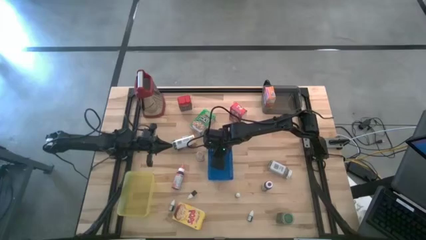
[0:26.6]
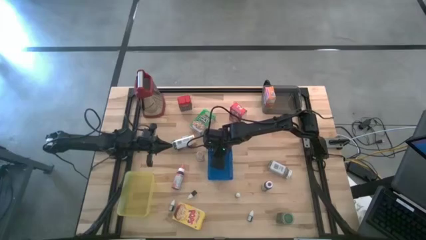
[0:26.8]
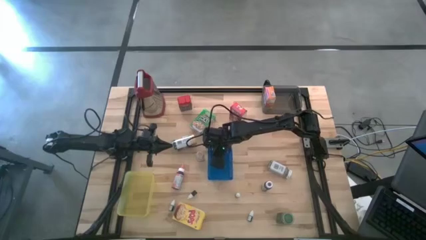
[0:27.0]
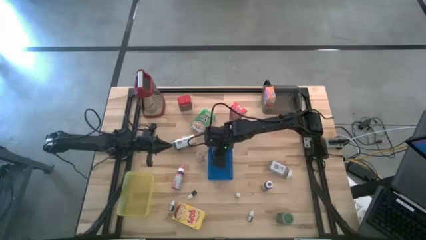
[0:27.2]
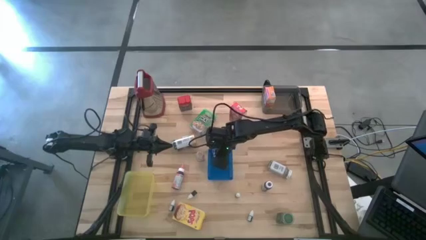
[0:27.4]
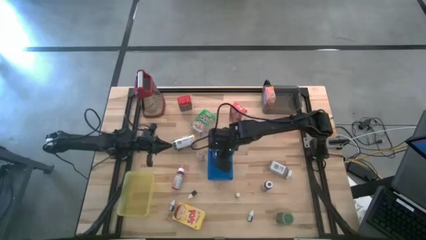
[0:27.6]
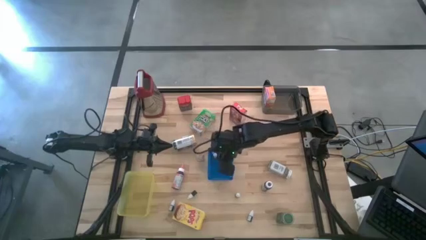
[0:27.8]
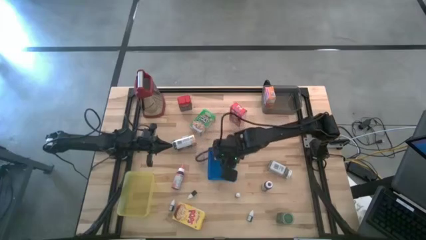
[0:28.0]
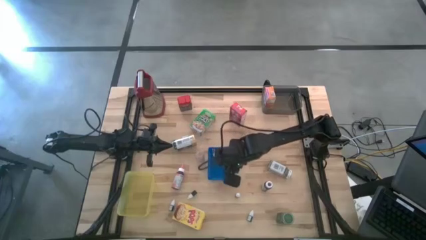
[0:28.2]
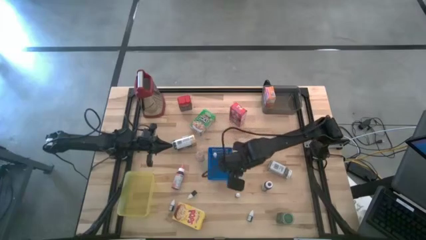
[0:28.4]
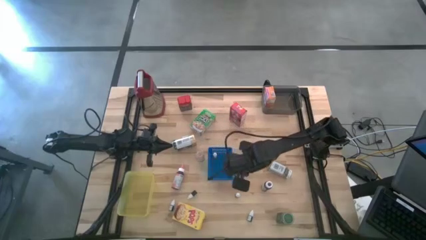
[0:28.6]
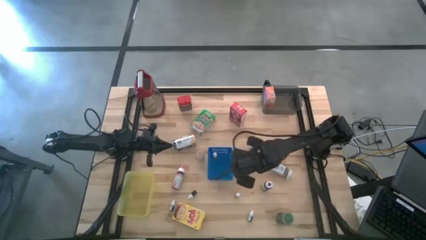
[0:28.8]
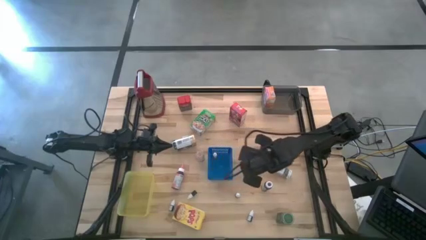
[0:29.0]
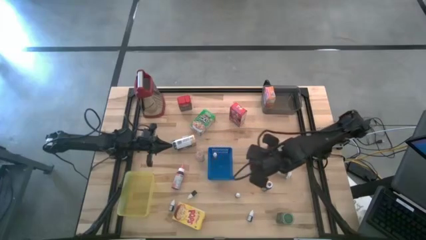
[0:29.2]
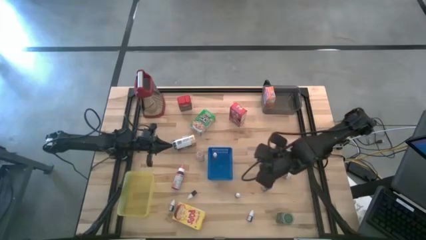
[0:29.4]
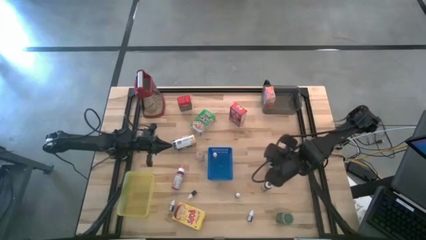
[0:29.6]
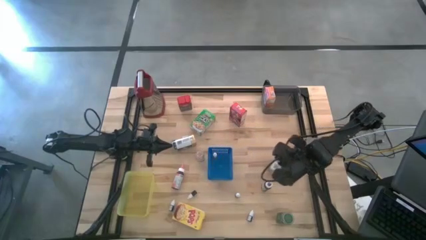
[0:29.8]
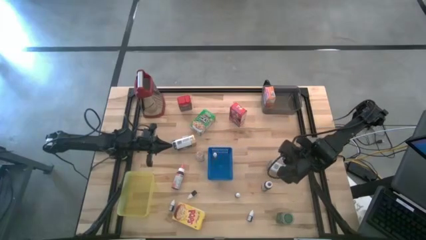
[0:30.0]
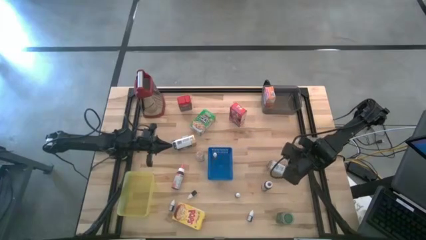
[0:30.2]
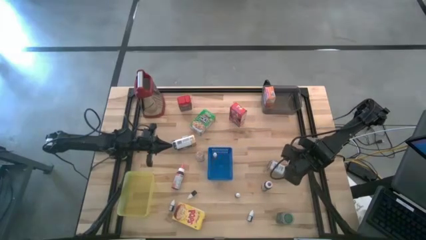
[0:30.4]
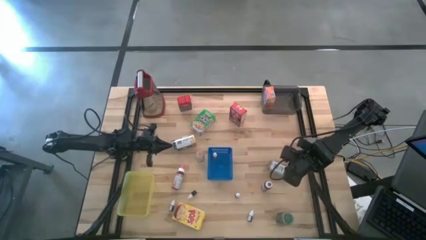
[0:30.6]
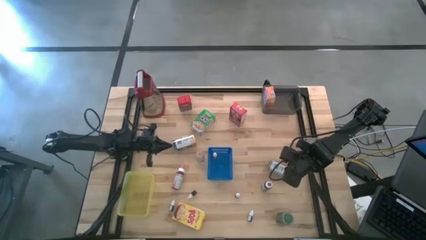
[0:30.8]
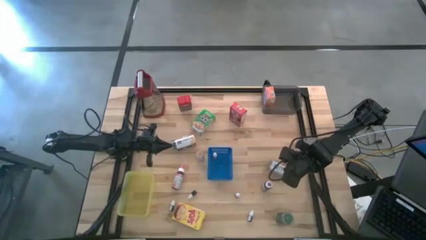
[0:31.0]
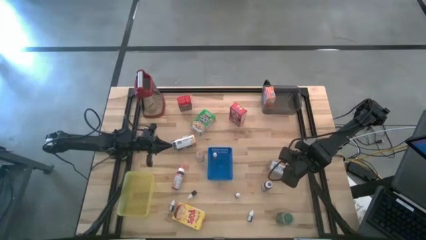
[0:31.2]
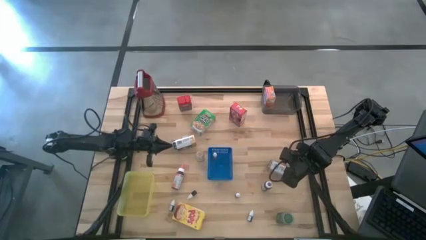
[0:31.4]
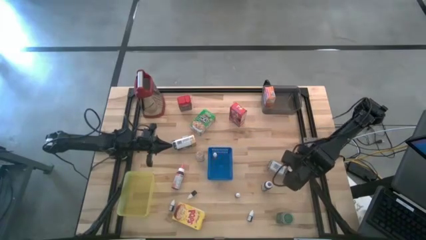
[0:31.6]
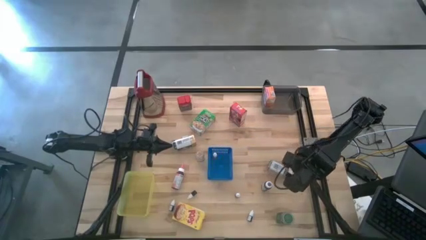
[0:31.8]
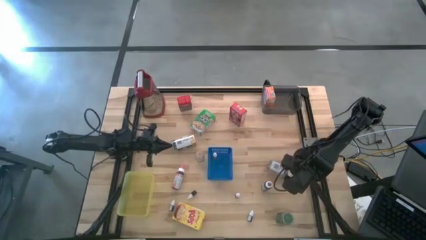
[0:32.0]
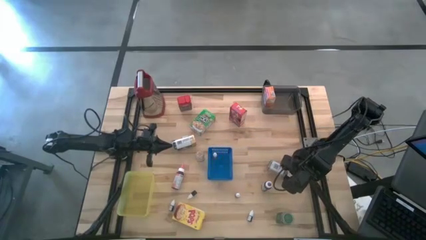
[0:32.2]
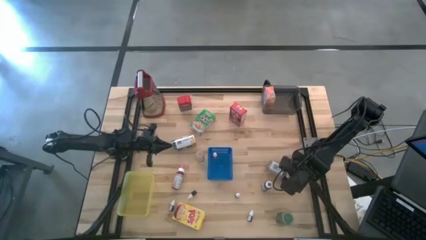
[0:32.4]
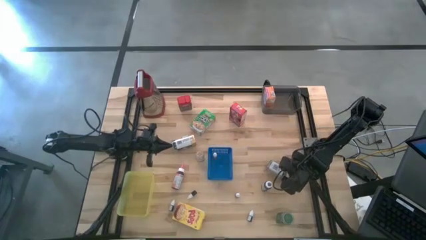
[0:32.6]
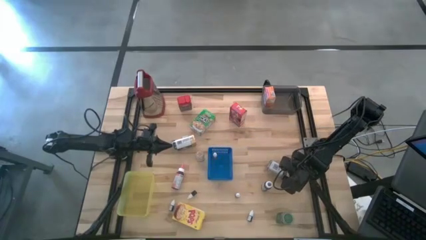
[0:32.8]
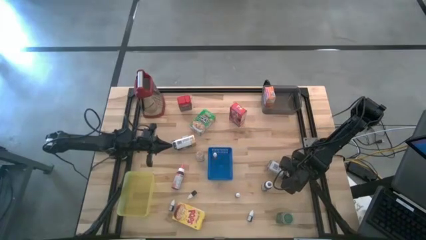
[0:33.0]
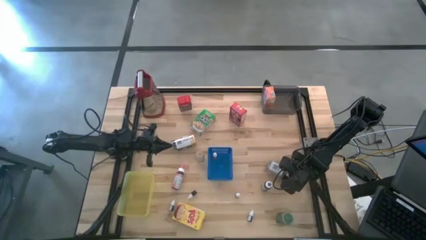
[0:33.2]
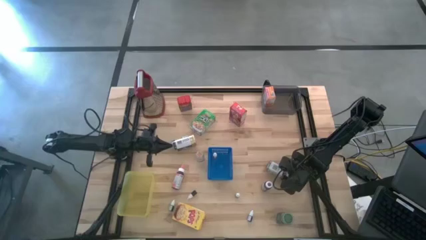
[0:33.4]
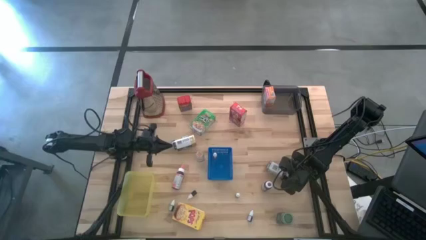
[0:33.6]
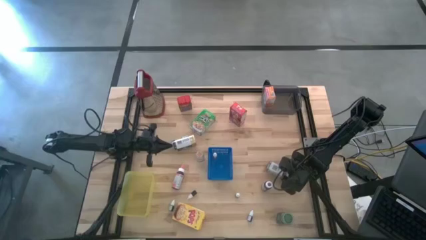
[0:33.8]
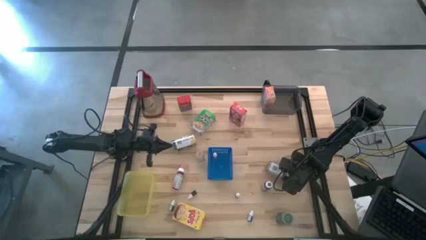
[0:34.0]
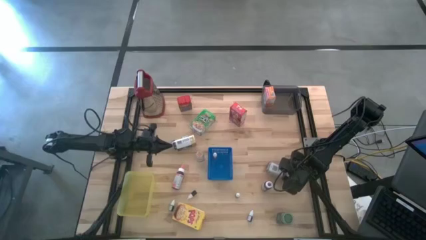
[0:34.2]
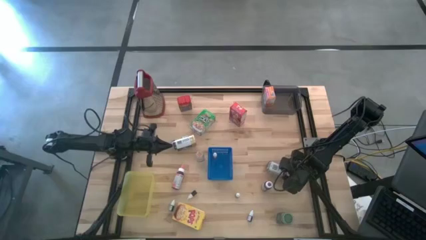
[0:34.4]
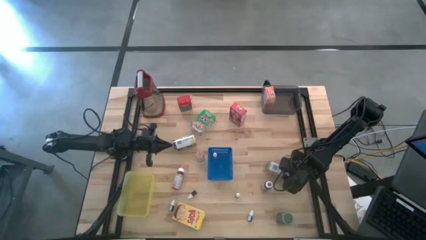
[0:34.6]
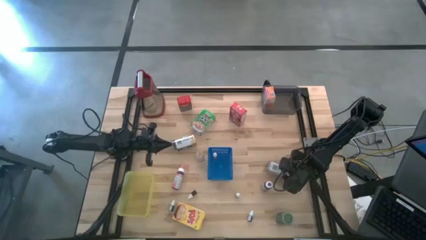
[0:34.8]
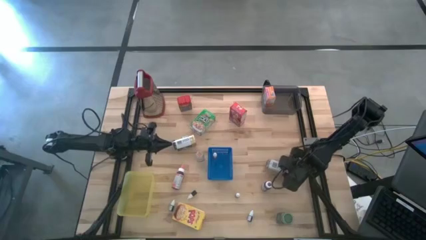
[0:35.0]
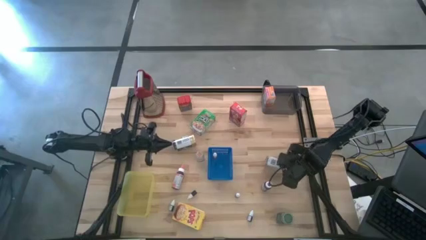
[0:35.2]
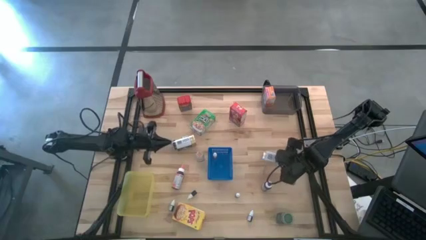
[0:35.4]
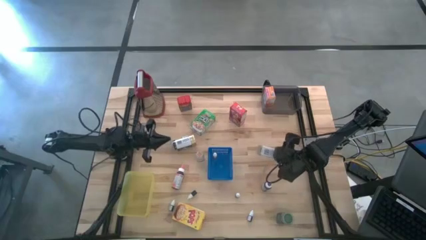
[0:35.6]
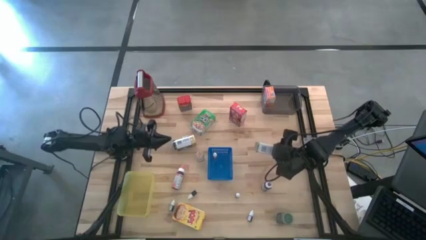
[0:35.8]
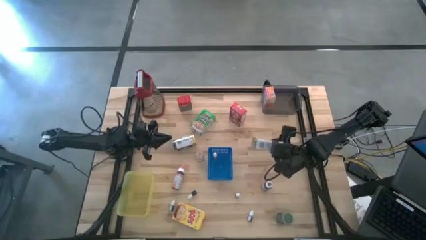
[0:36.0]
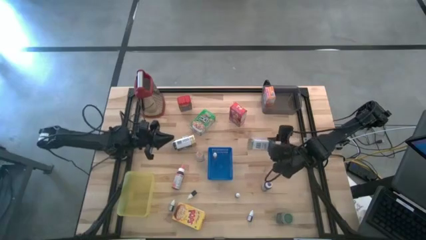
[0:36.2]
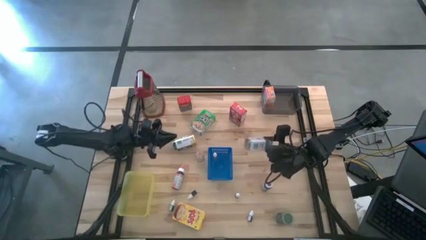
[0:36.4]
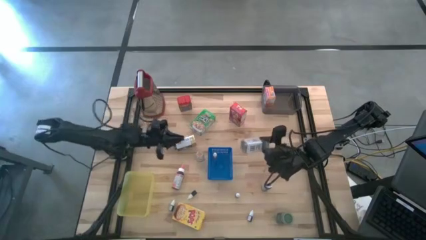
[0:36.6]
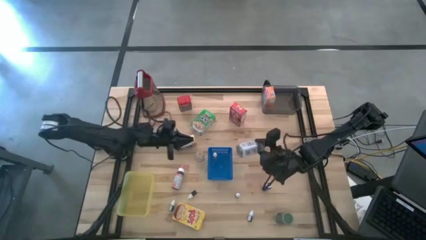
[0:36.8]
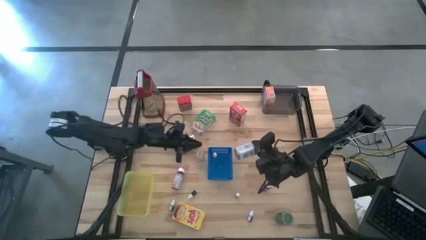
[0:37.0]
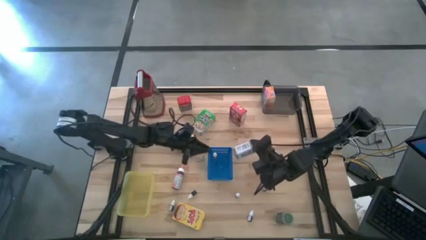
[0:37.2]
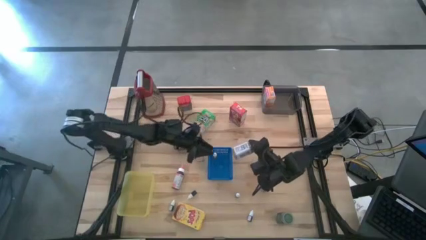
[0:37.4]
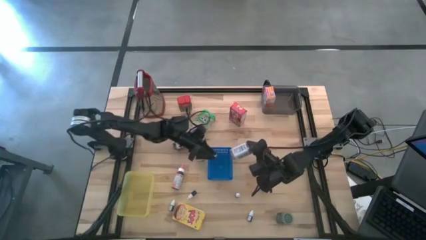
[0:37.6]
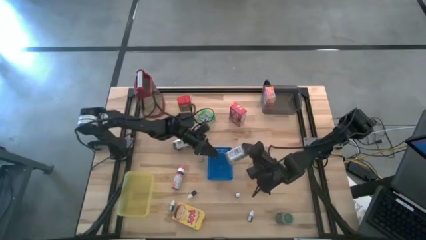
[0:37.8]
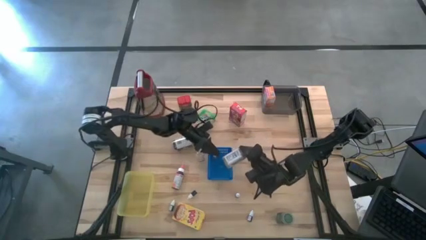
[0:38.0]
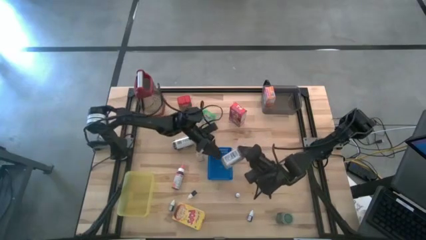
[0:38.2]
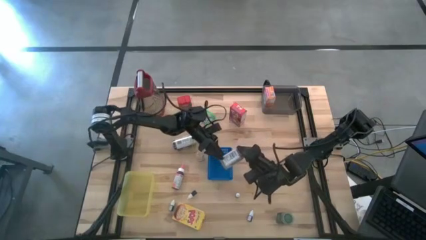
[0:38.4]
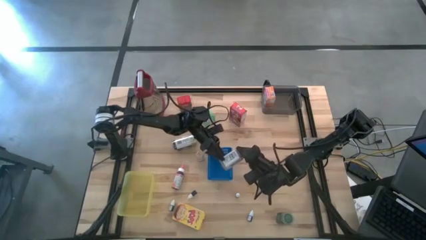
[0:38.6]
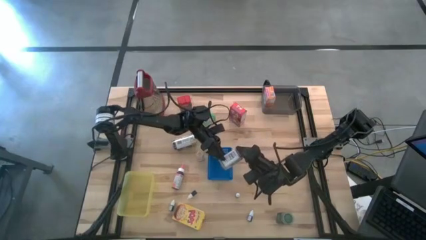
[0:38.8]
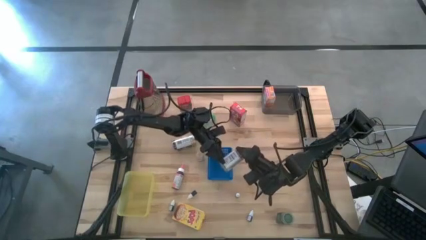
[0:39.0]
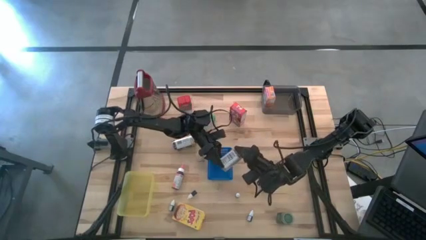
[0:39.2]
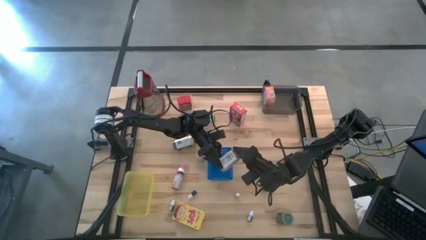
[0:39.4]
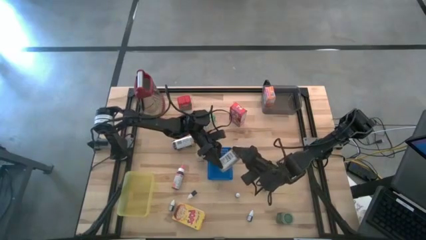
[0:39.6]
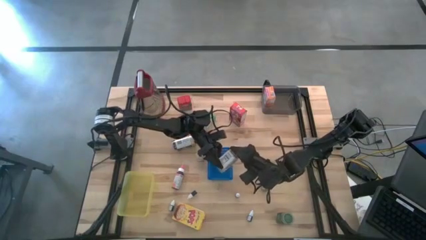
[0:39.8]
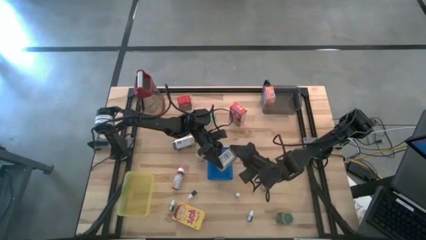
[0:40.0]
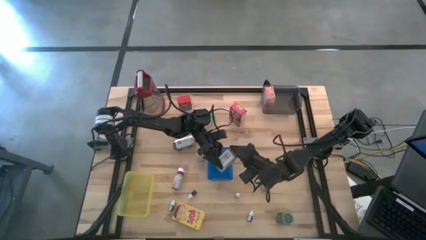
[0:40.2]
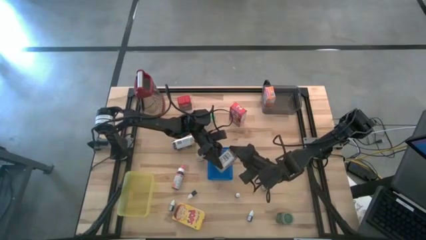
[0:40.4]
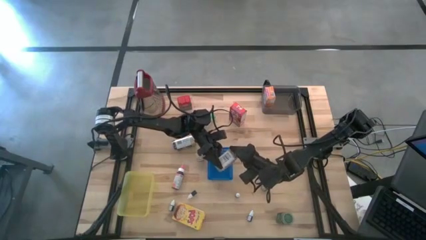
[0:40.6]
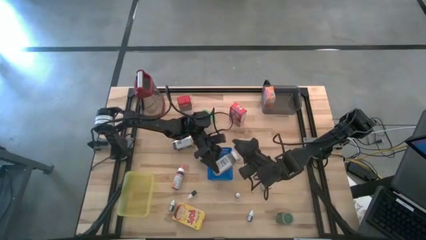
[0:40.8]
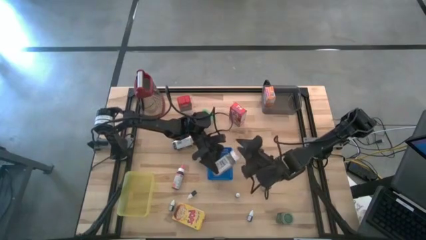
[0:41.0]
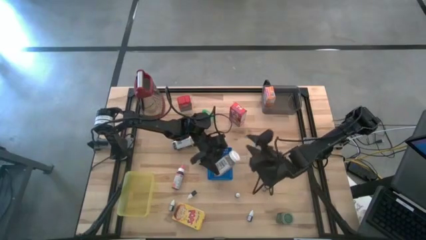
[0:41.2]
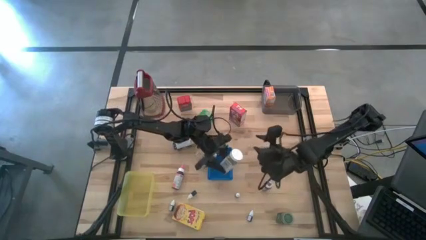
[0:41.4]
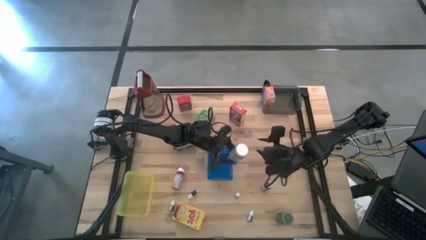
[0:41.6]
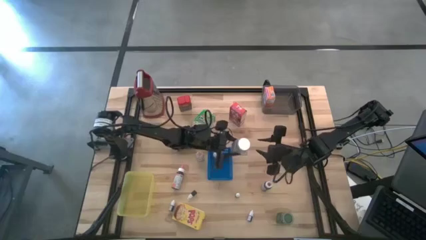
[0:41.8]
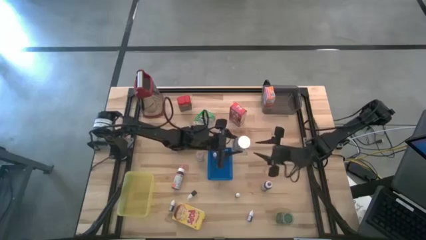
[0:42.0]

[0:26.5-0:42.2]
Task: Pick & Place Kitchen Items
Put the white seasoning bottle into the yellow bin
